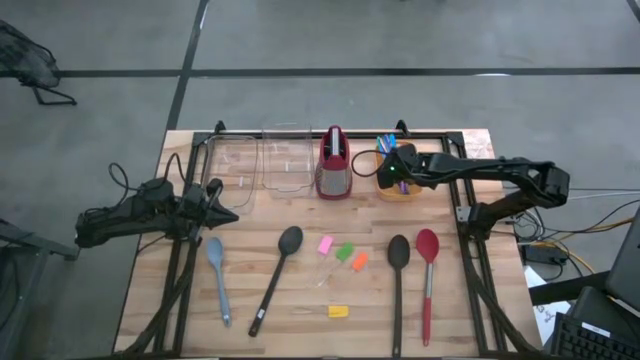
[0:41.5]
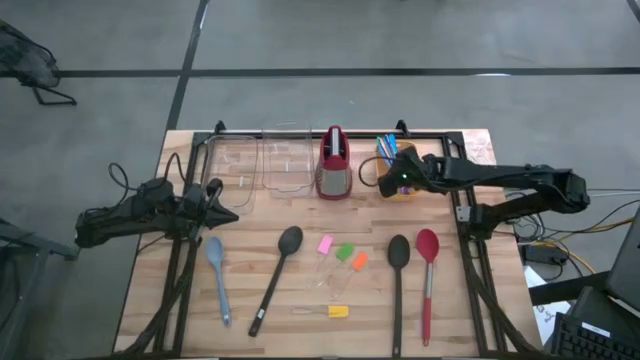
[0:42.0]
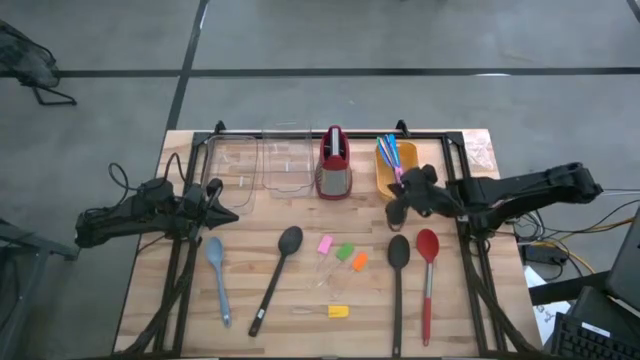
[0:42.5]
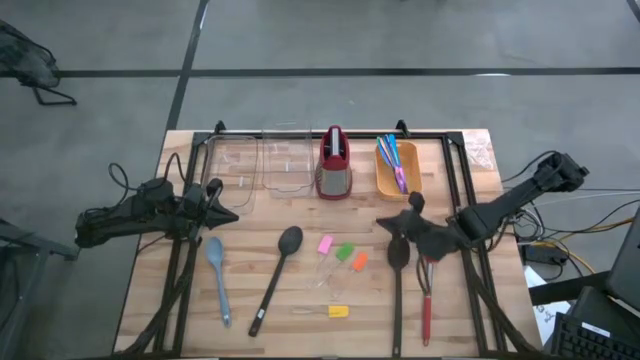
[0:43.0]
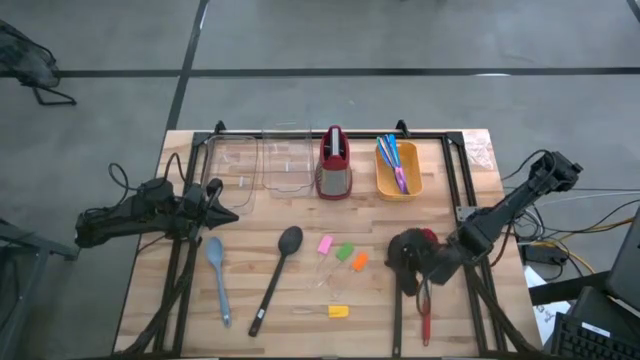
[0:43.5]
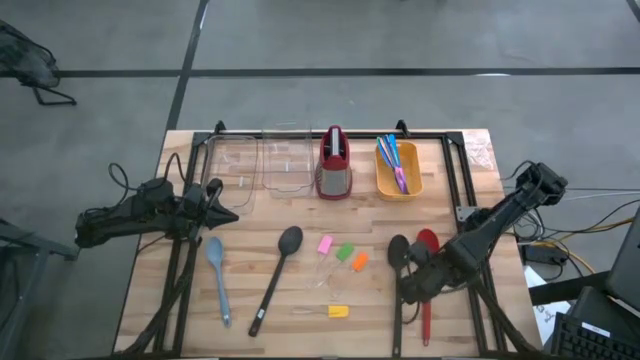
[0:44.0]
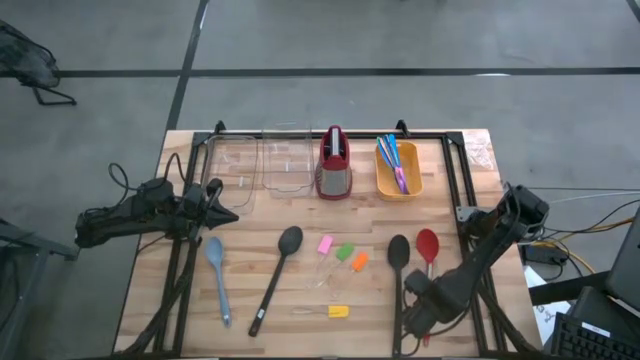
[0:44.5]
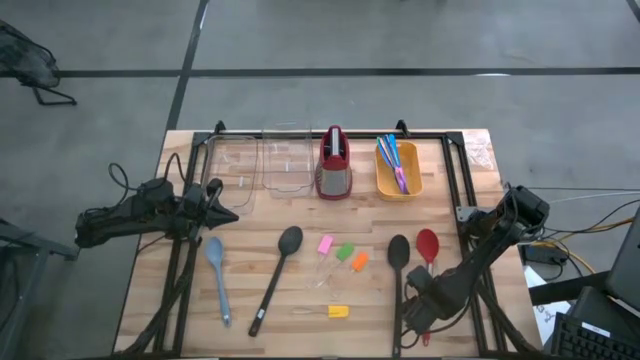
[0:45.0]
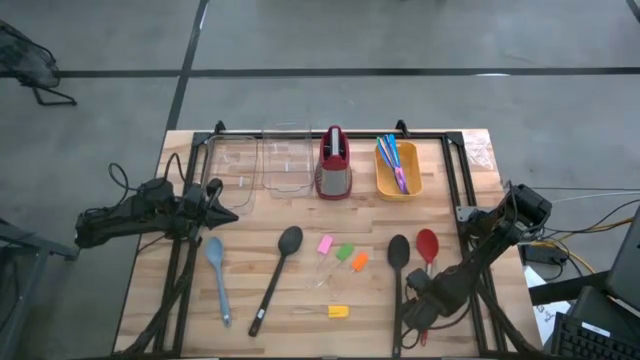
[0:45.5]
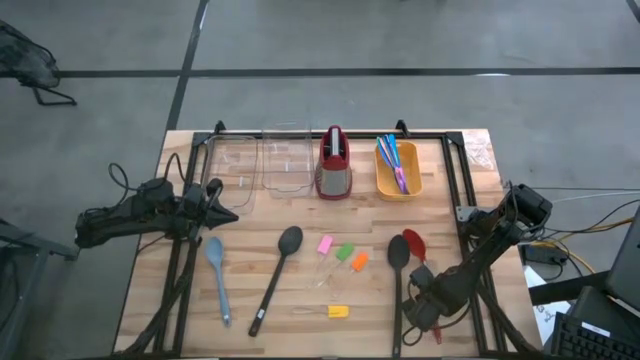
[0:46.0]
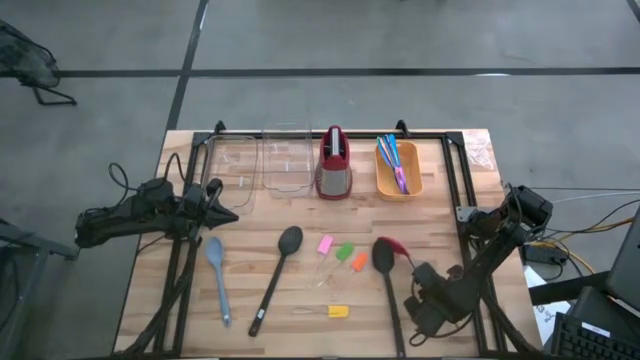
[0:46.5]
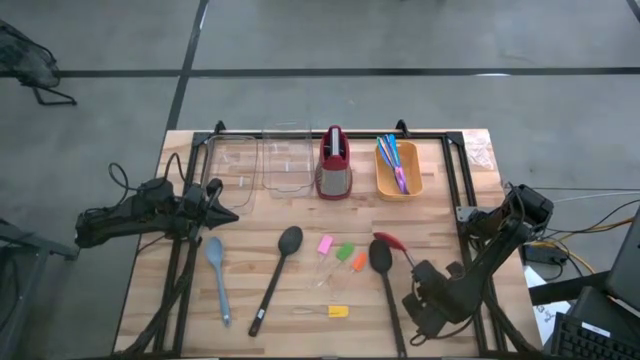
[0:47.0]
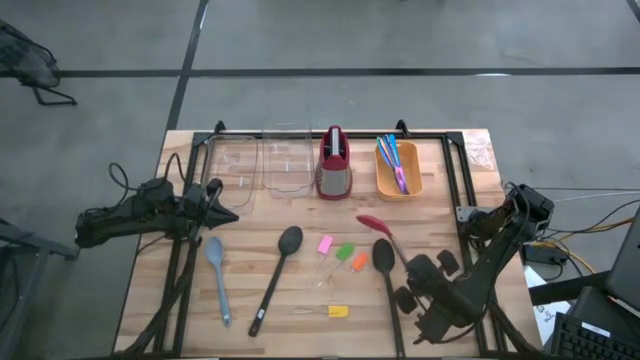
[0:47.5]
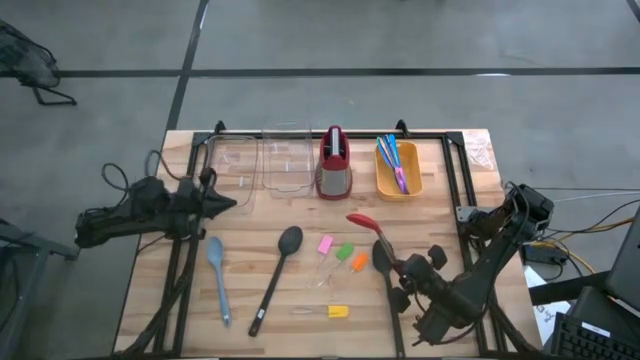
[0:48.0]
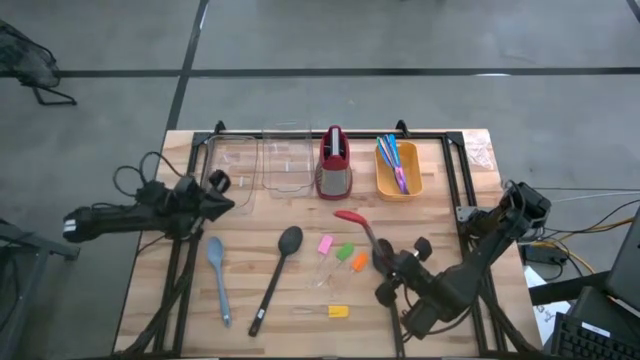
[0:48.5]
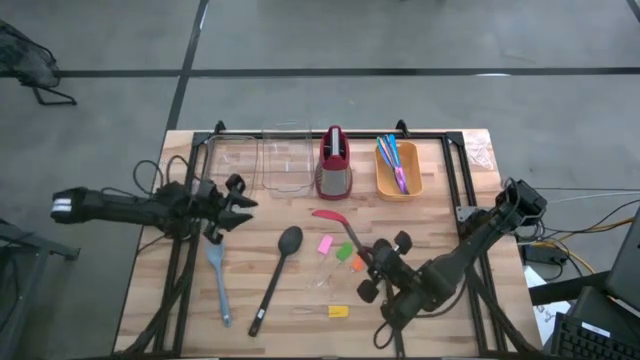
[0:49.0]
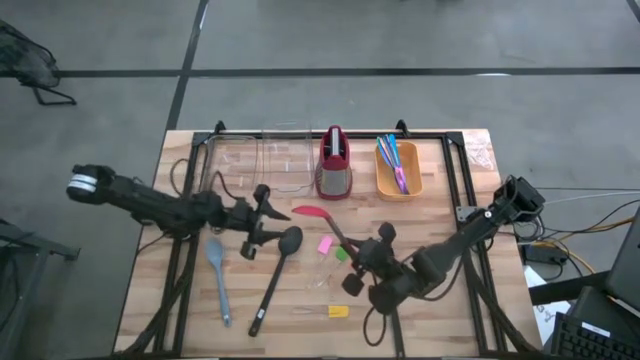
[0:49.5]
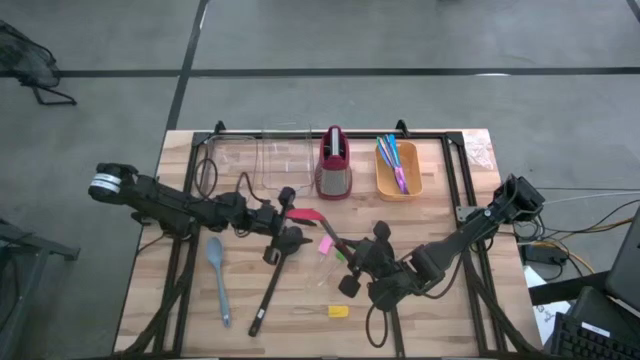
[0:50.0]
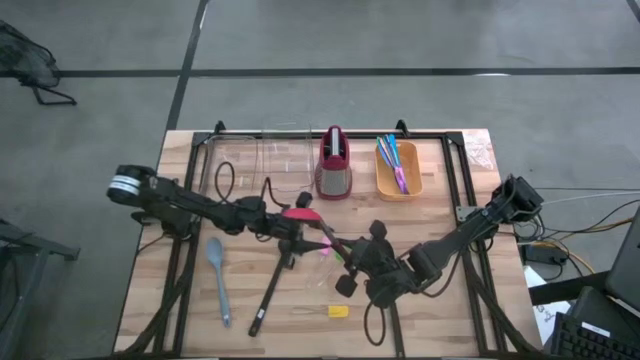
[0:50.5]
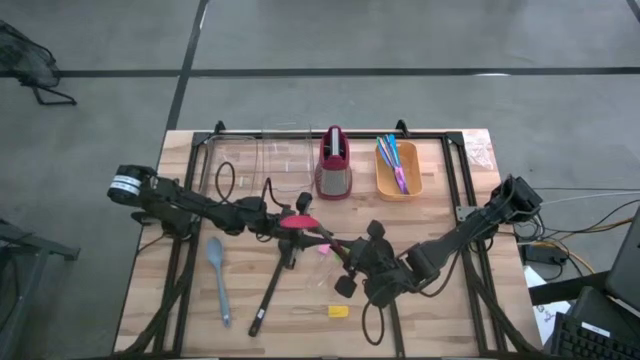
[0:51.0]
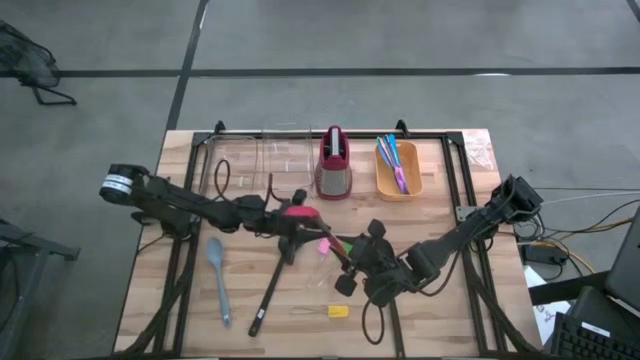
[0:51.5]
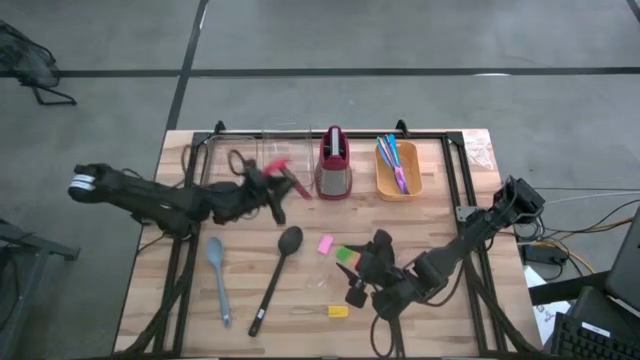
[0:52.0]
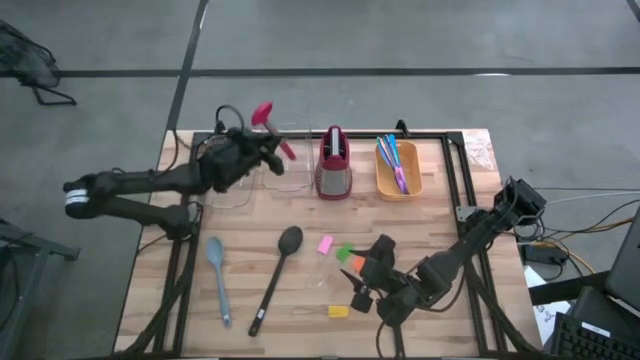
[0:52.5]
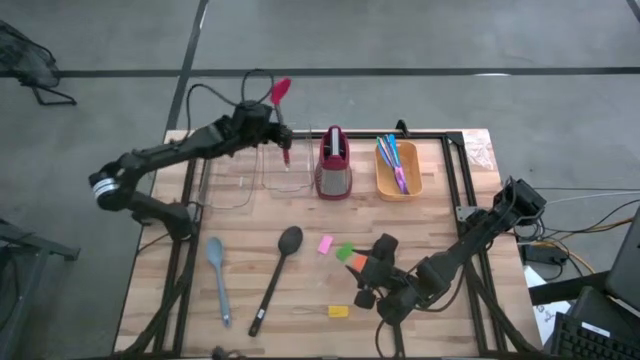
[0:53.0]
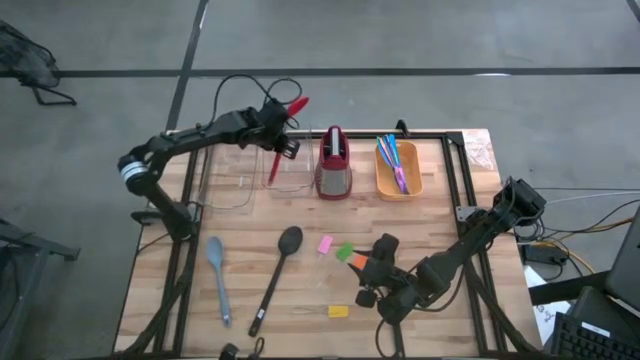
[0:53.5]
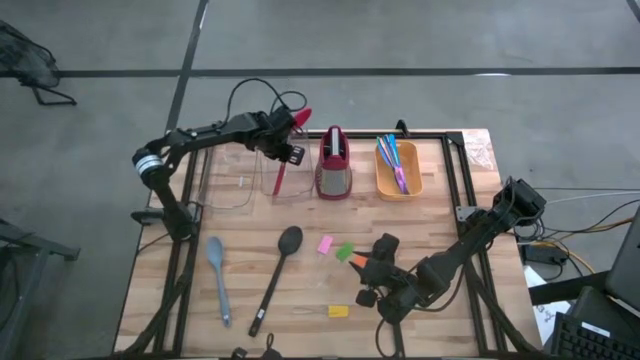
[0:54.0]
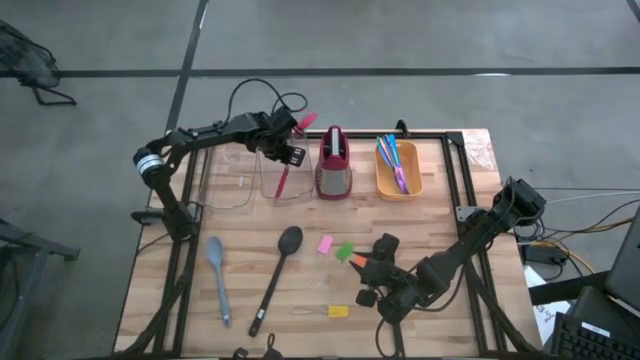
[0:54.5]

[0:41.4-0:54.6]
Task: Pick & Place Kitchen Items
Put the red serving spoon into the right transparent bin

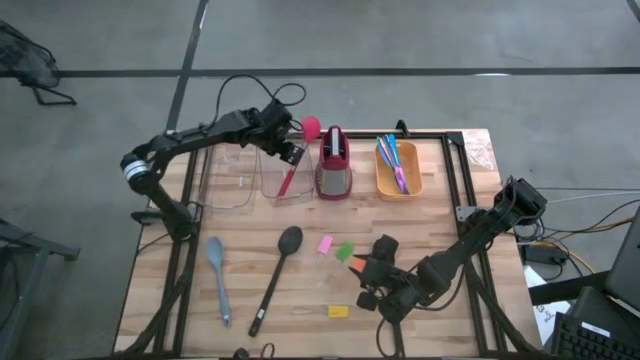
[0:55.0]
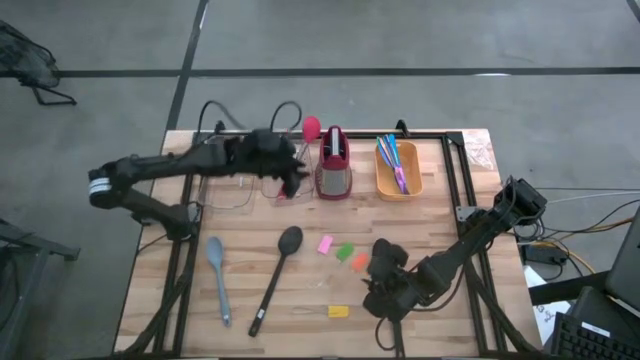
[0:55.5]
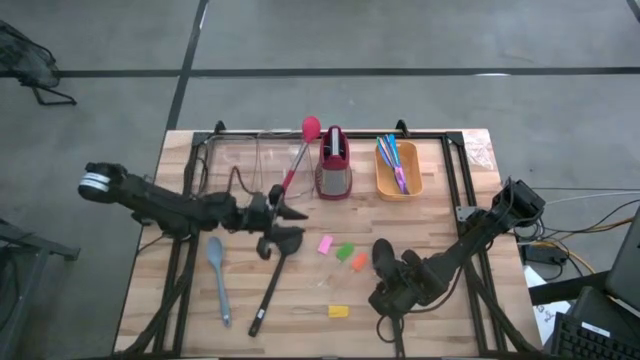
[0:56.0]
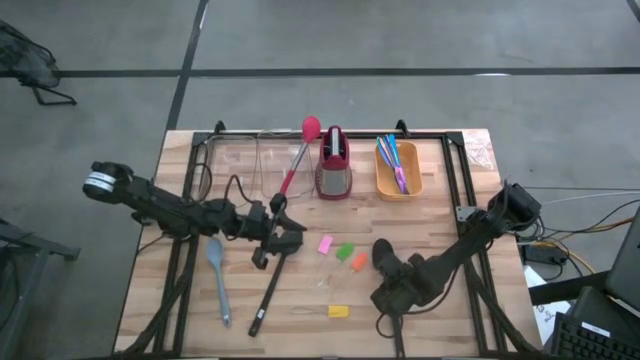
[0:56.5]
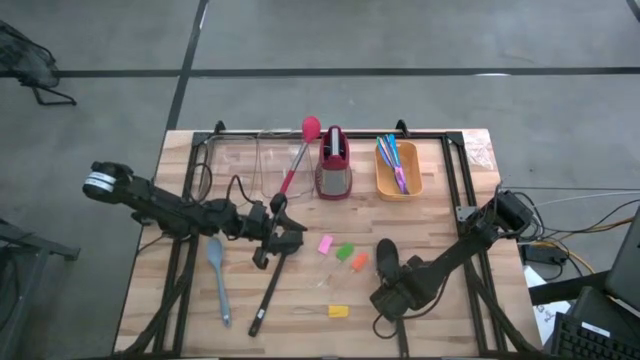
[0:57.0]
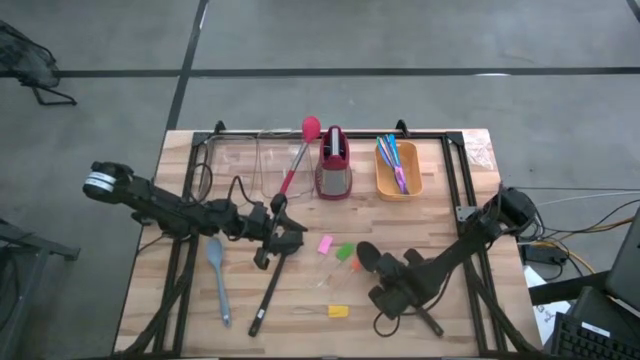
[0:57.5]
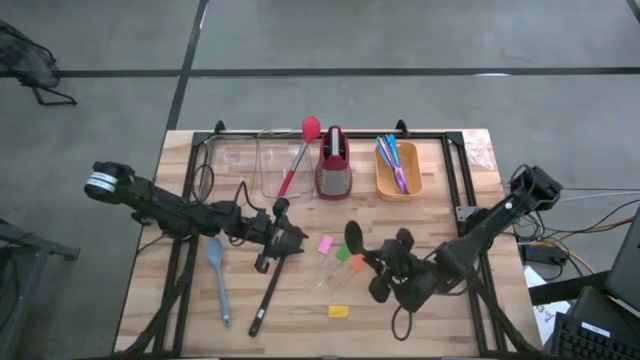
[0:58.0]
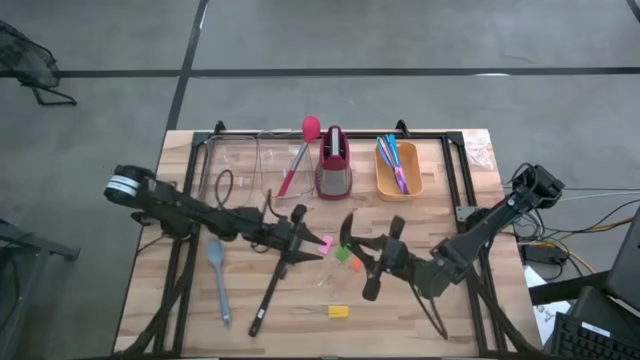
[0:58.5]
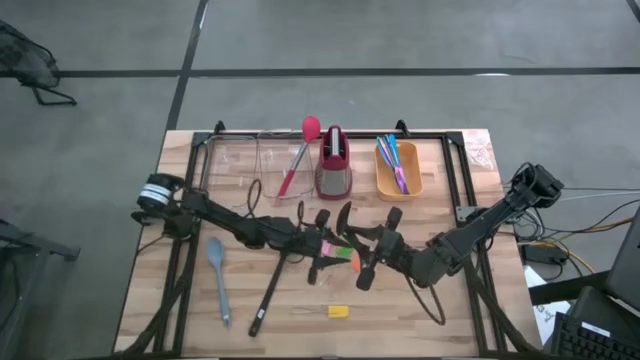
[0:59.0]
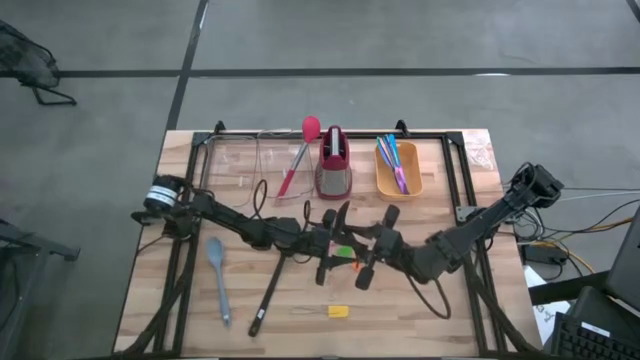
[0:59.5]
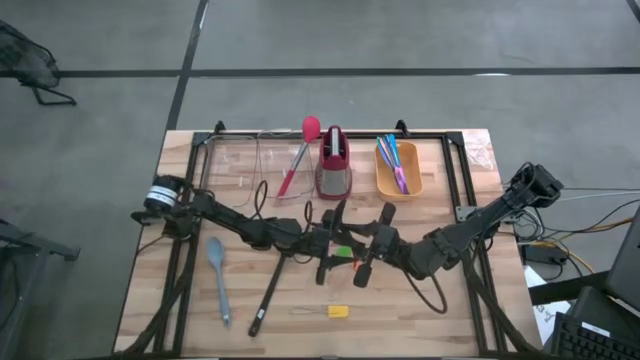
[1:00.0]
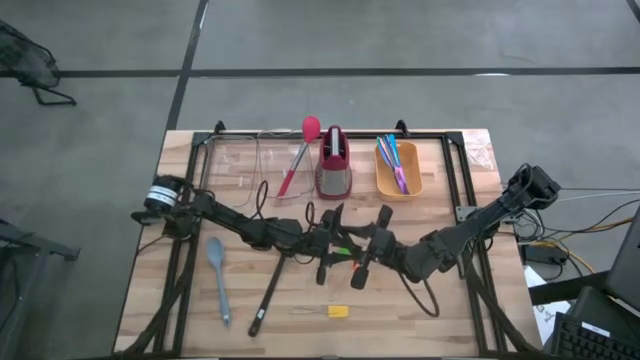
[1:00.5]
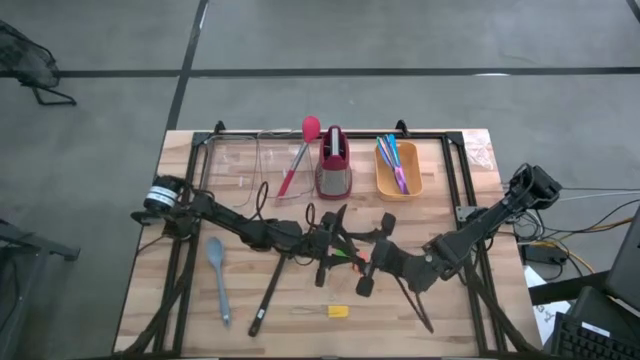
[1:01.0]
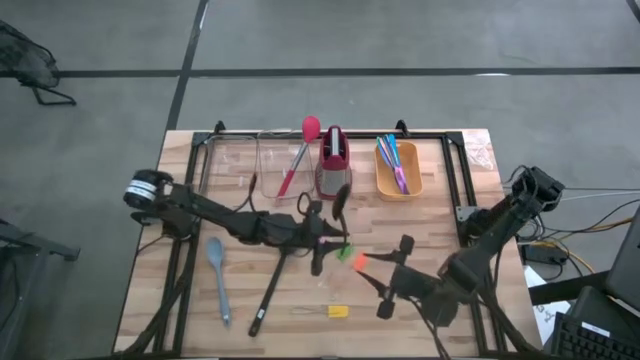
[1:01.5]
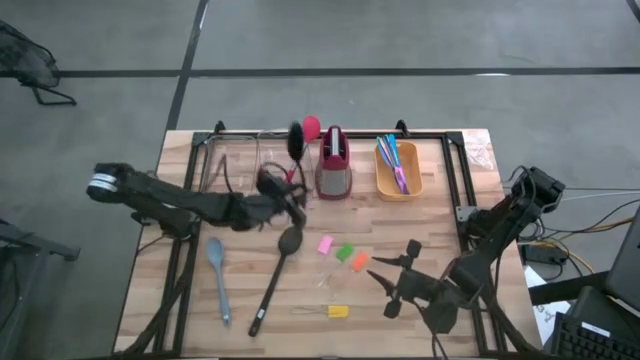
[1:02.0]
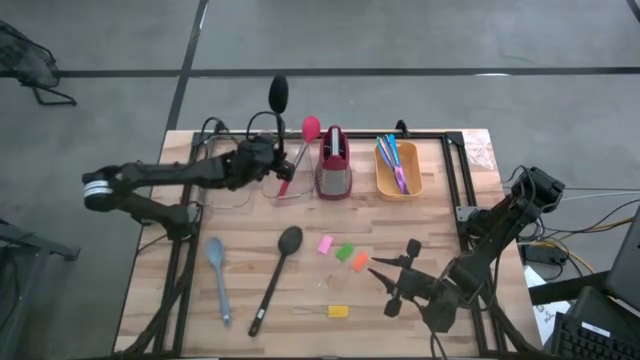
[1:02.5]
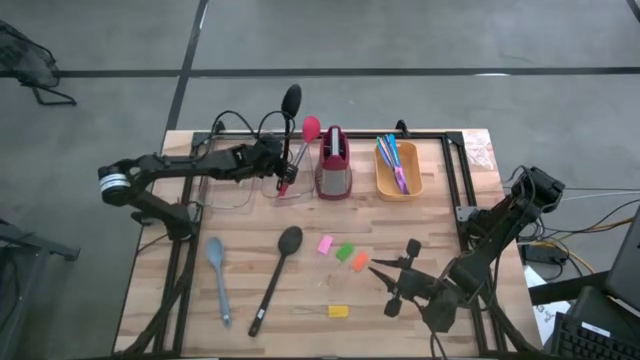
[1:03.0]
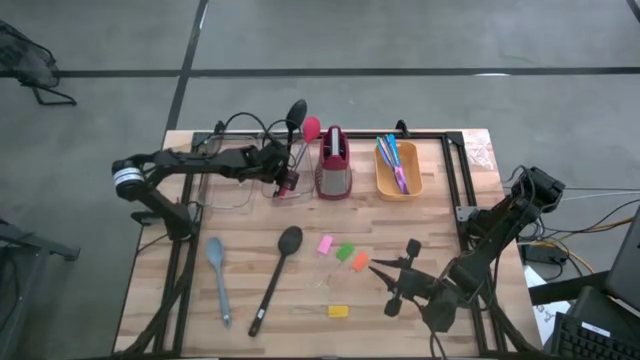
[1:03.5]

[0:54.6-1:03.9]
Put the right black serving spoon into the right transparent bin
